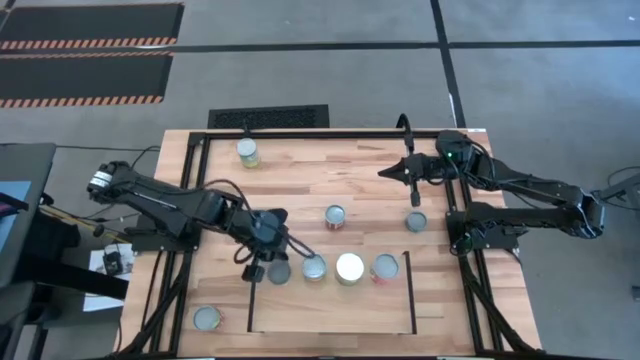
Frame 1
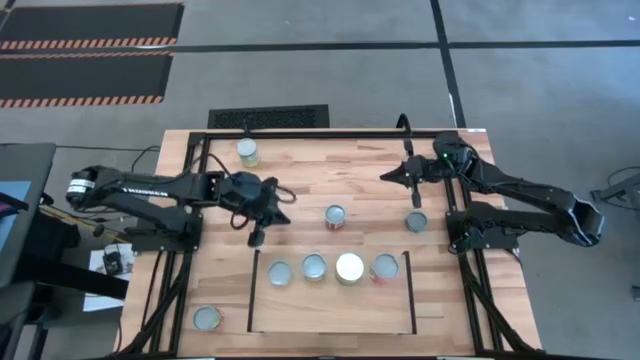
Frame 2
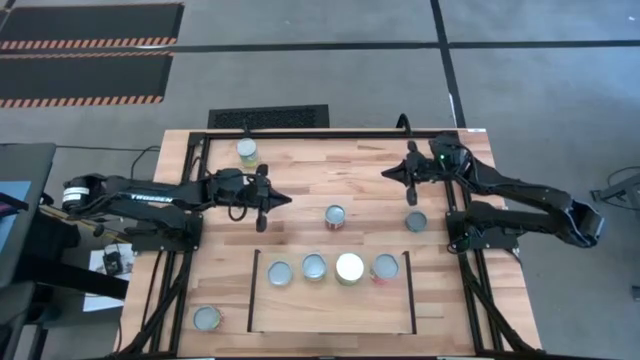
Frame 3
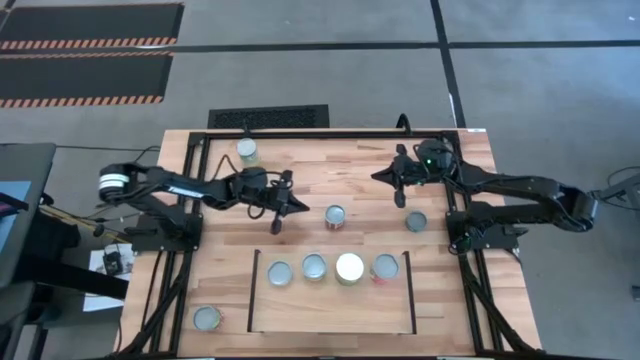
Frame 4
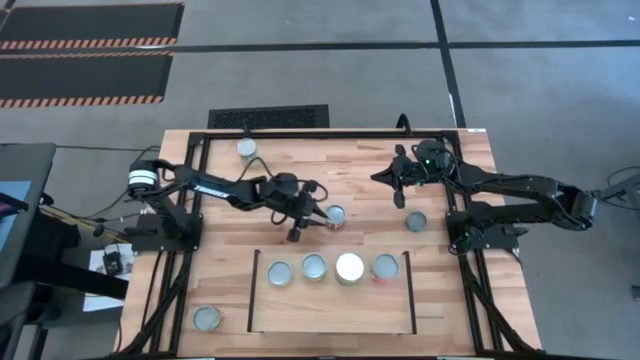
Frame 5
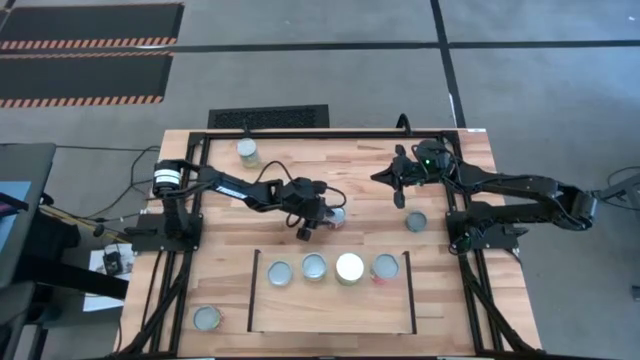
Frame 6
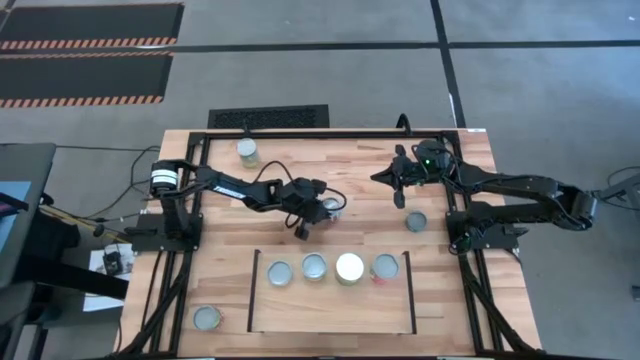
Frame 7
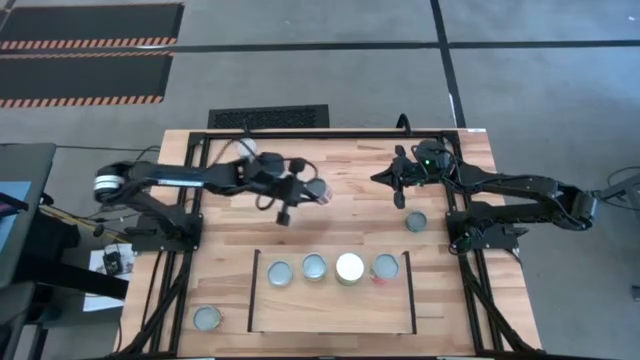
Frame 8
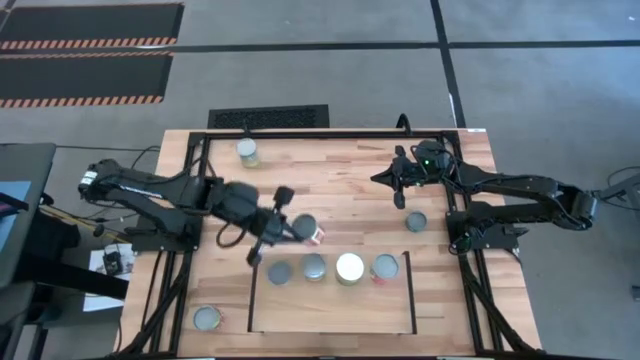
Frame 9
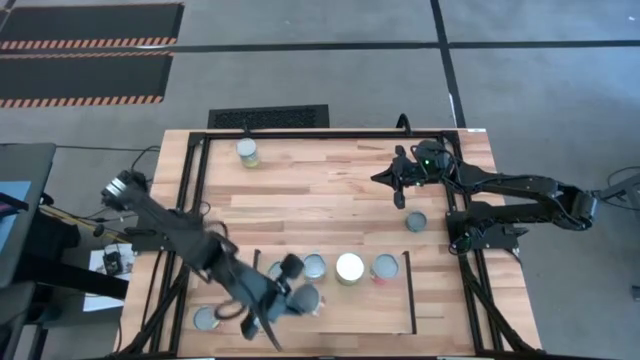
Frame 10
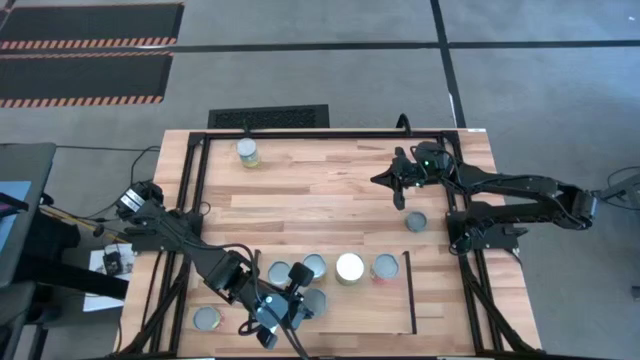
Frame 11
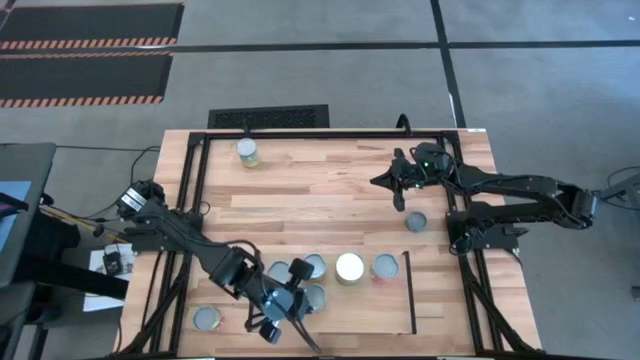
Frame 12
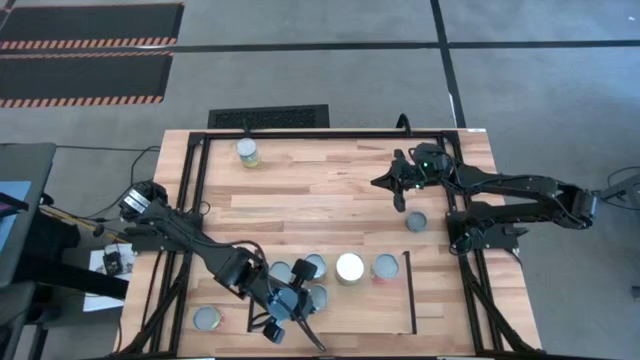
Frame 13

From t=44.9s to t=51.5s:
Task: Pick and place cans onto a shelf
Put the red tomato can on the shelf aligned with other cans on the shelf

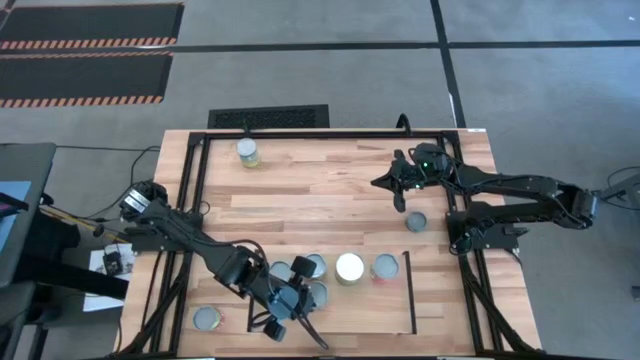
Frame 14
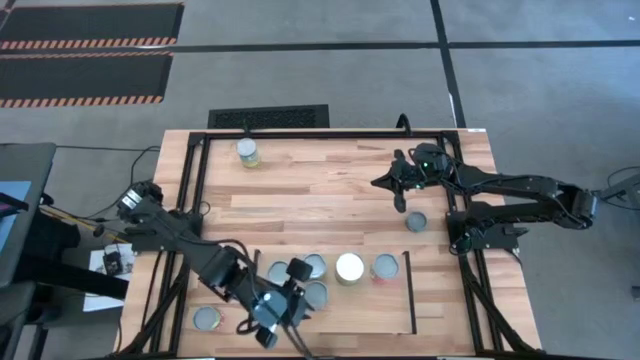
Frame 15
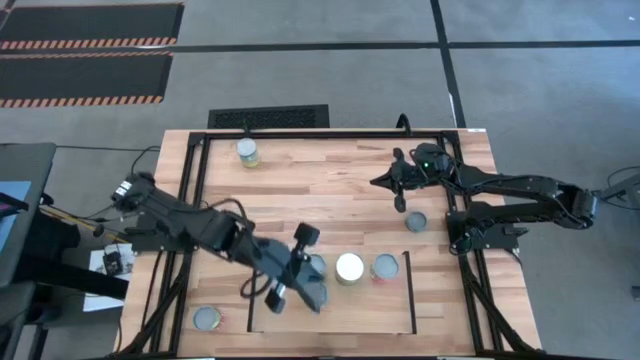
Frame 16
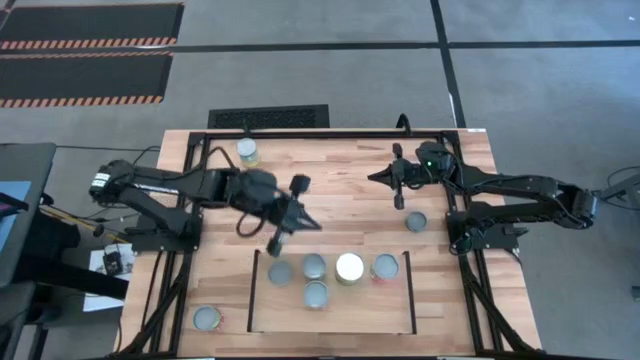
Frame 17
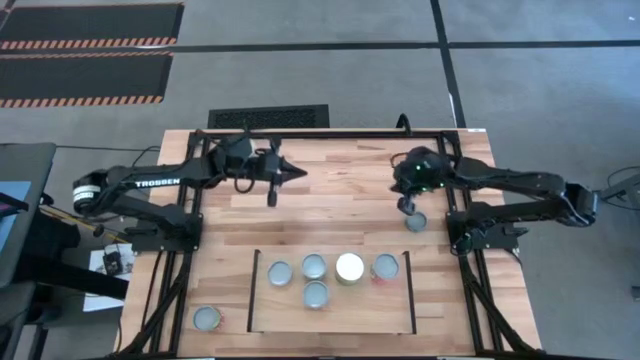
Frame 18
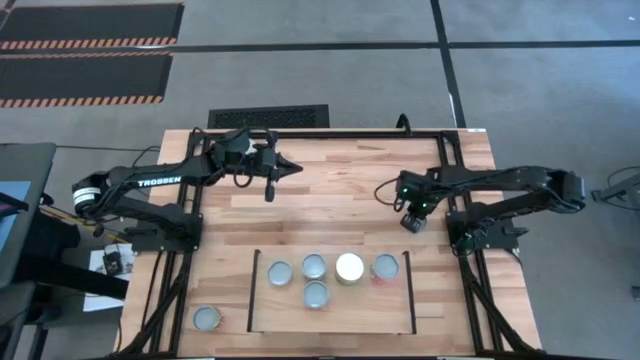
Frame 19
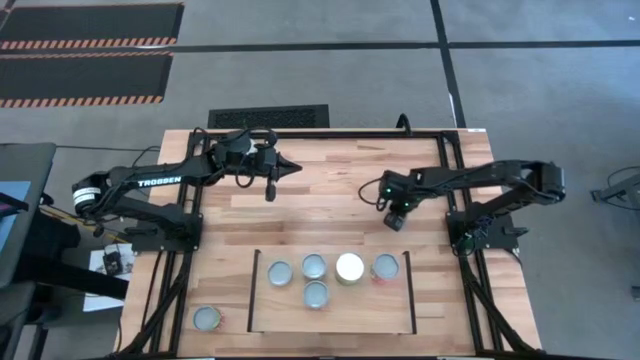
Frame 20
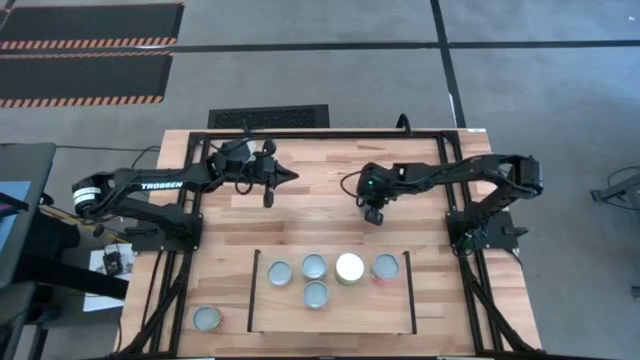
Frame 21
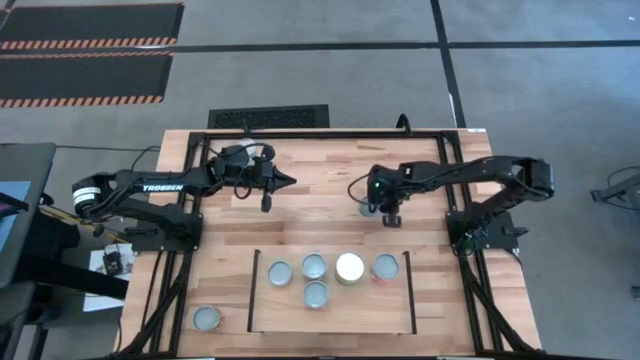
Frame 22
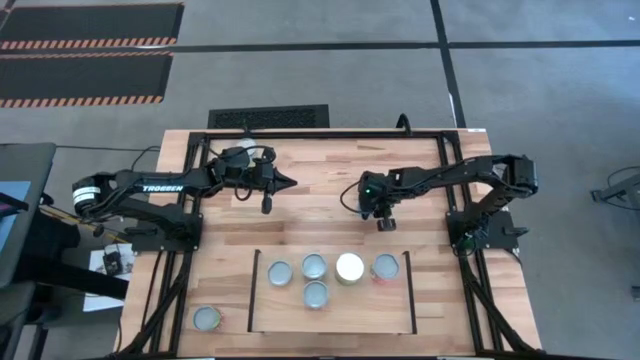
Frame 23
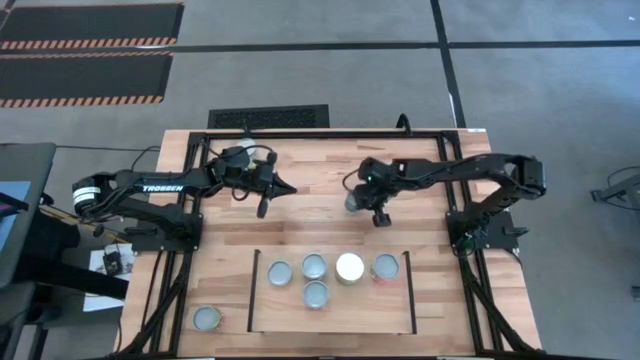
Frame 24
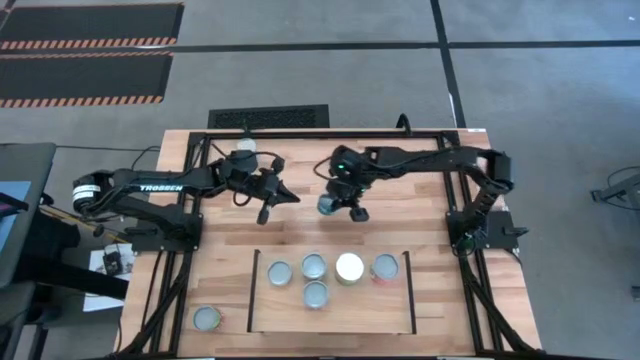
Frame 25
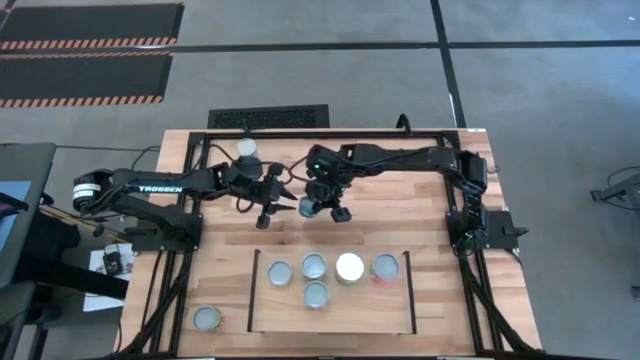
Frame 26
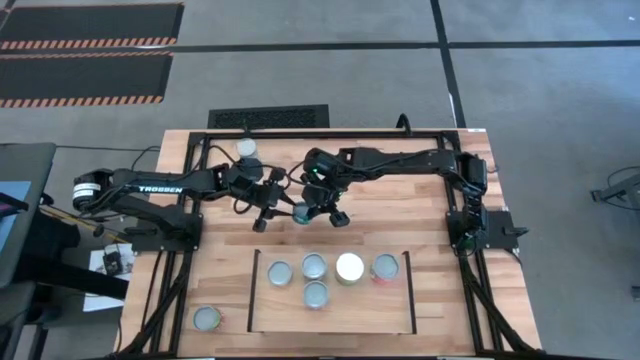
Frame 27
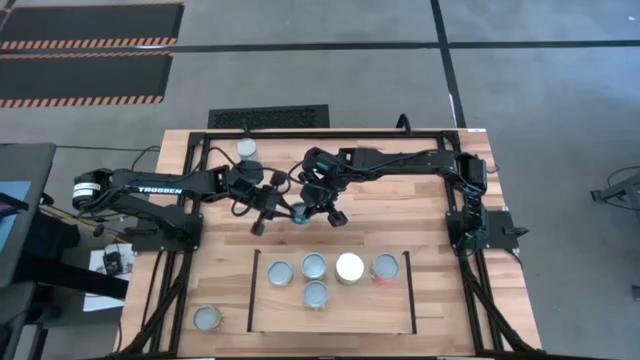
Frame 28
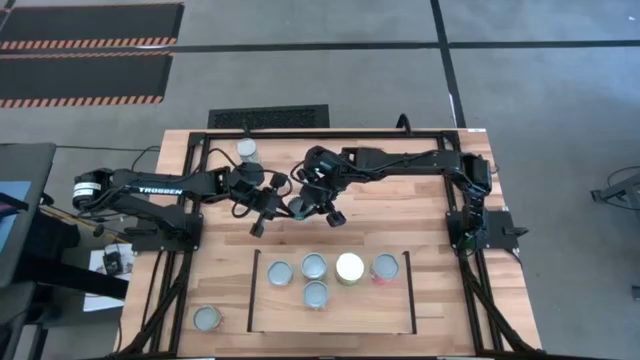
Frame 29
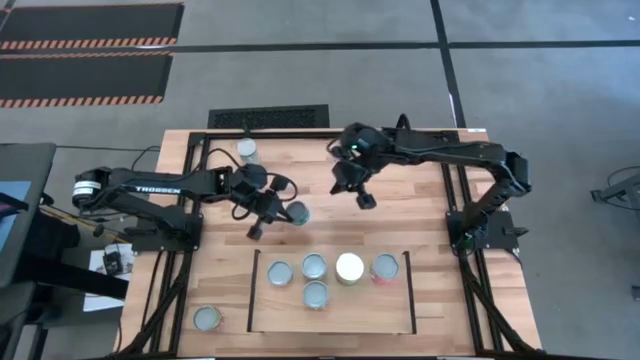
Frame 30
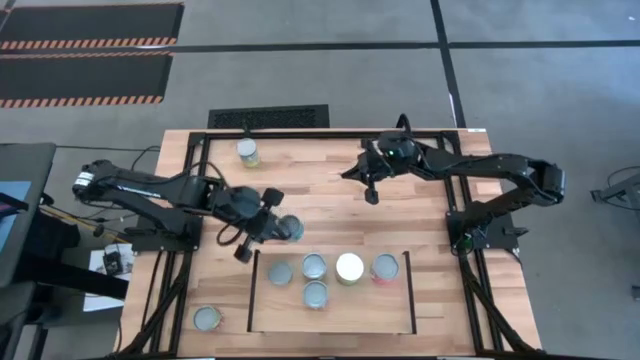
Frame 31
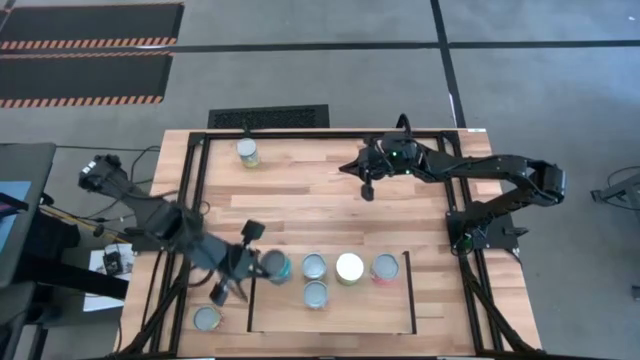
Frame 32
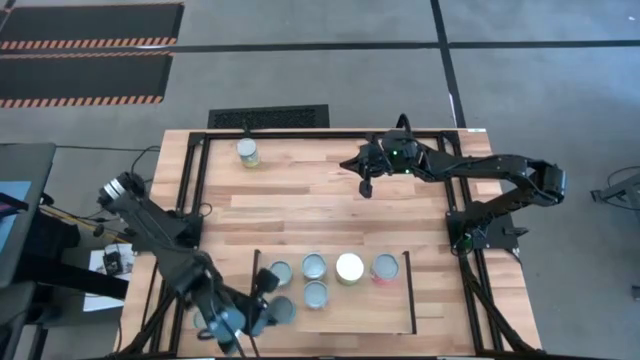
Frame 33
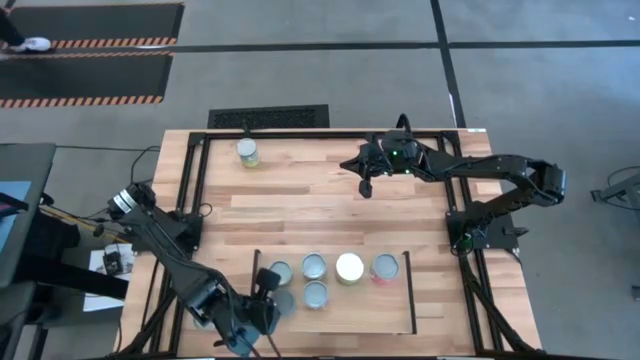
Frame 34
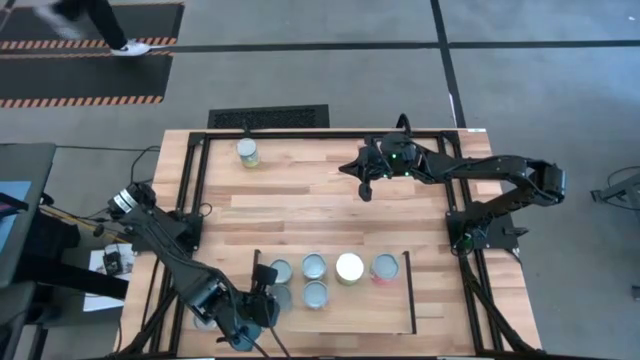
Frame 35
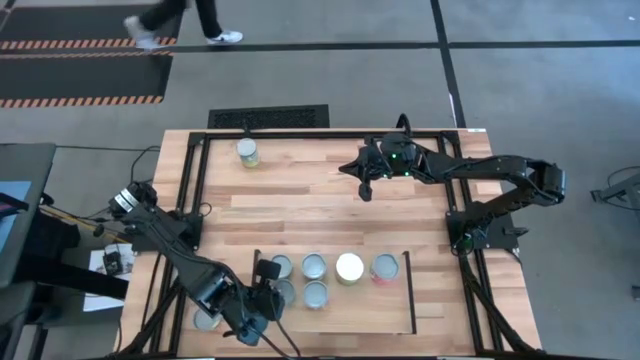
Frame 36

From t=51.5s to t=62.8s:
Put the blue tuna can on the shelf aligned with other cans on the shelf

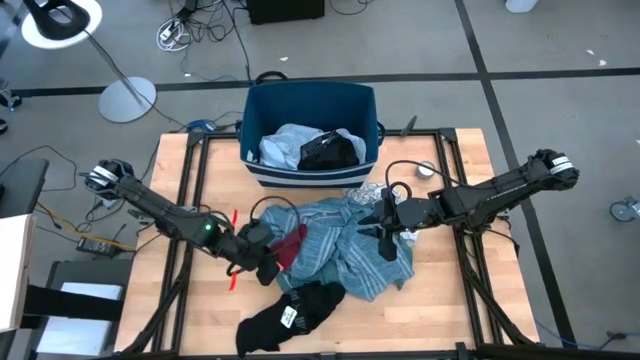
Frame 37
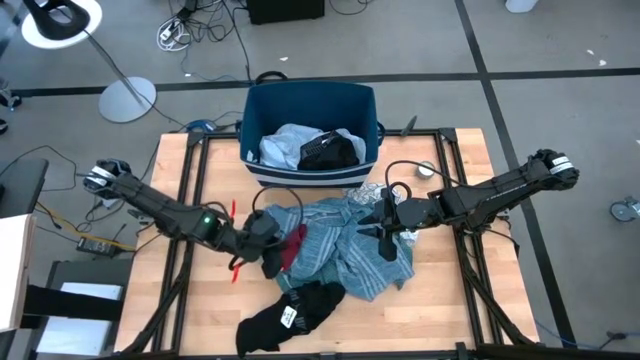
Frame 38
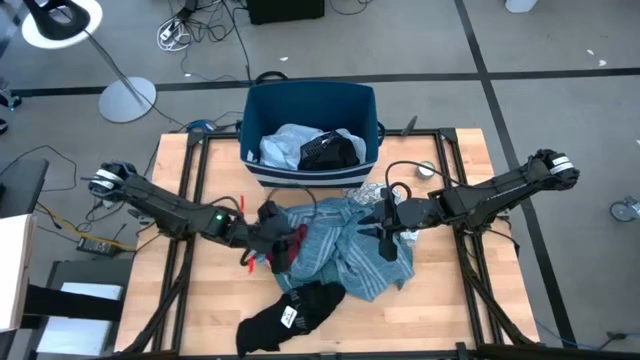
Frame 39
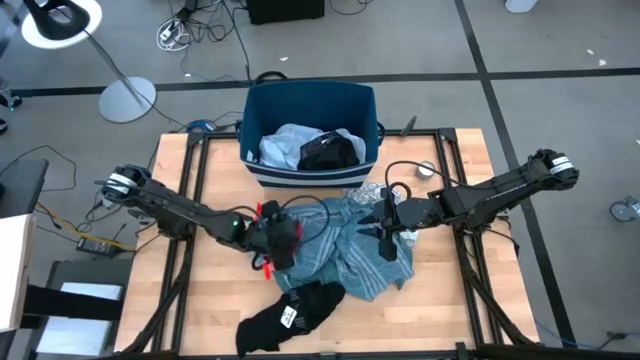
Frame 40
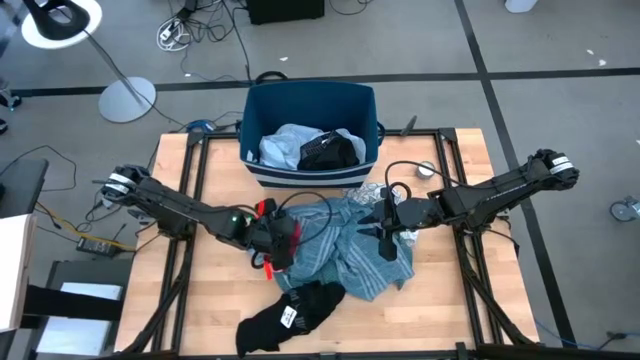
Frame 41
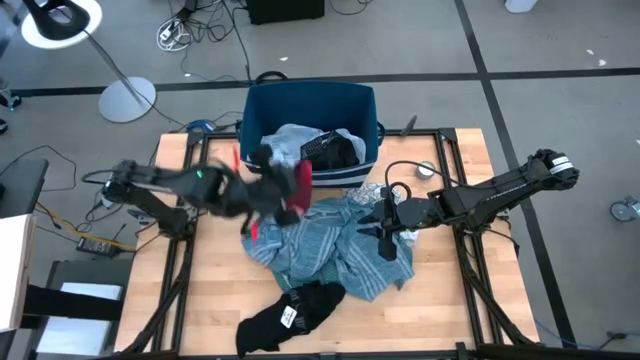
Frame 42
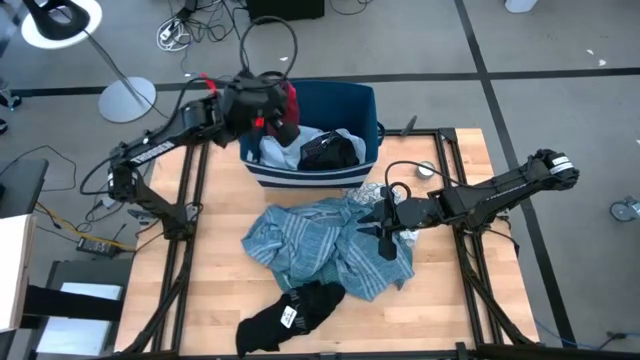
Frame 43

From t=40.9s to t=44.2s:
Task: Sort clothes
Put the red sock into the blue laundry organizer
